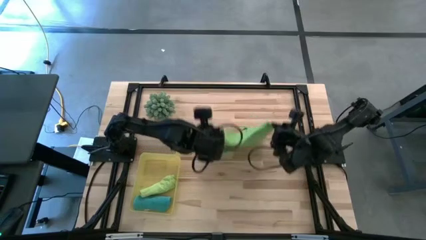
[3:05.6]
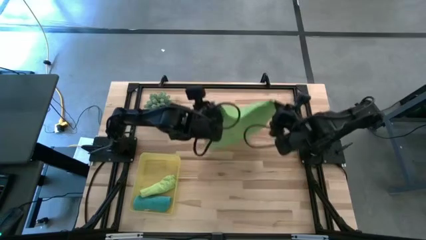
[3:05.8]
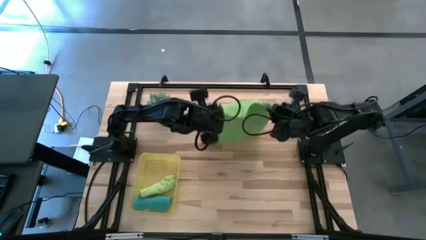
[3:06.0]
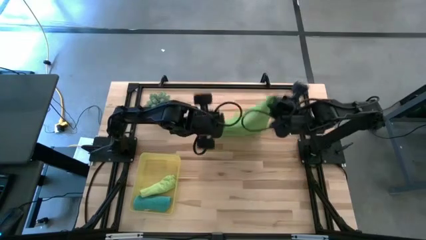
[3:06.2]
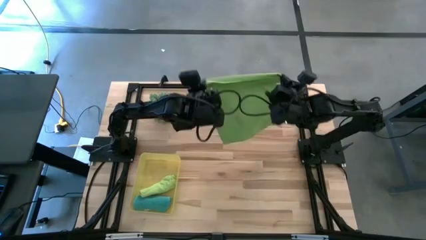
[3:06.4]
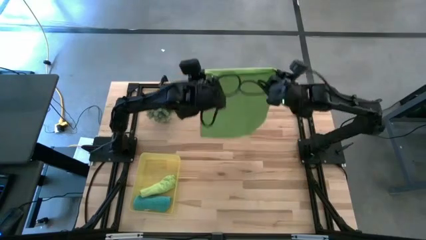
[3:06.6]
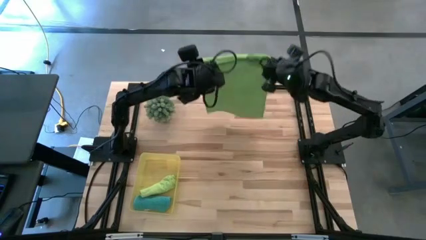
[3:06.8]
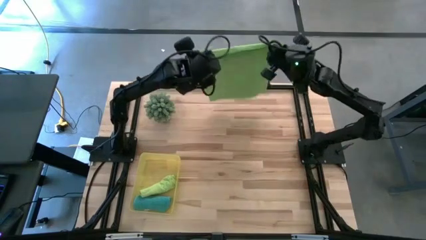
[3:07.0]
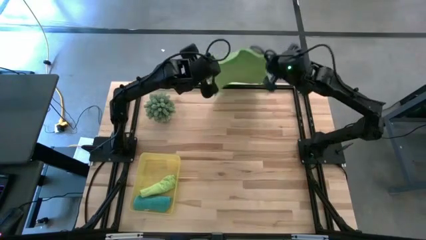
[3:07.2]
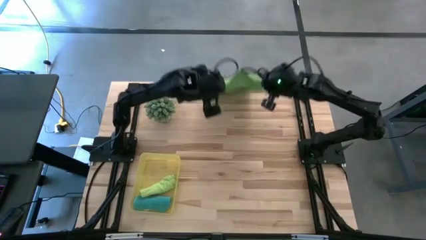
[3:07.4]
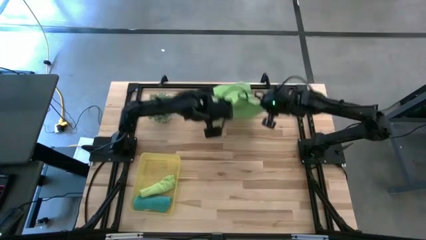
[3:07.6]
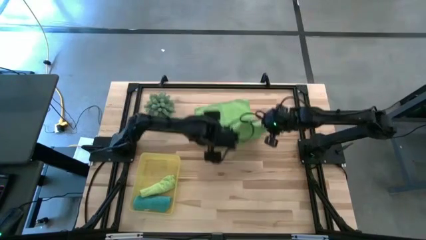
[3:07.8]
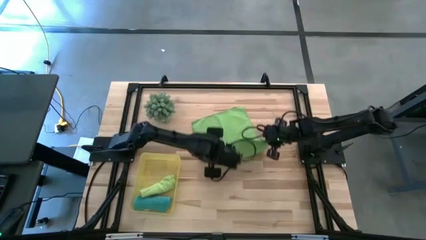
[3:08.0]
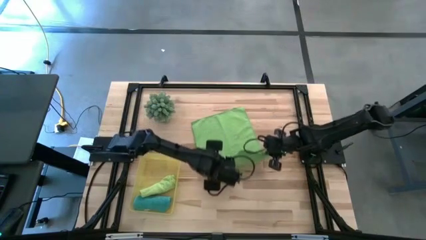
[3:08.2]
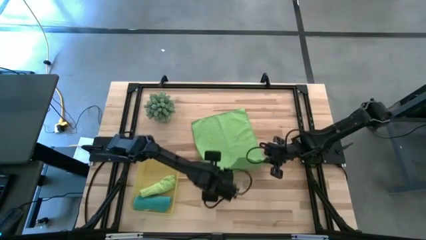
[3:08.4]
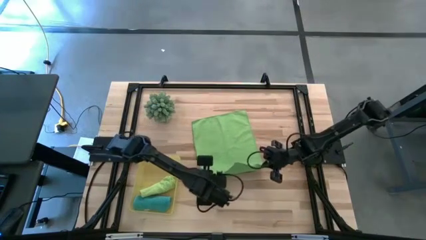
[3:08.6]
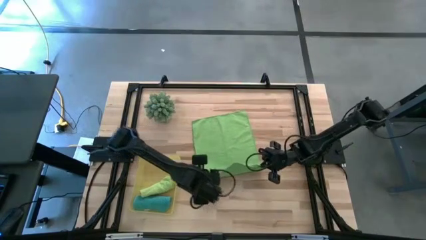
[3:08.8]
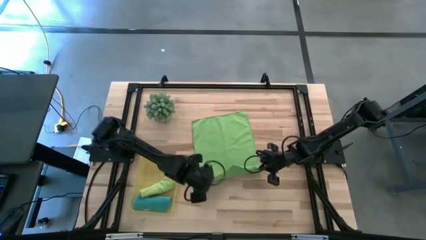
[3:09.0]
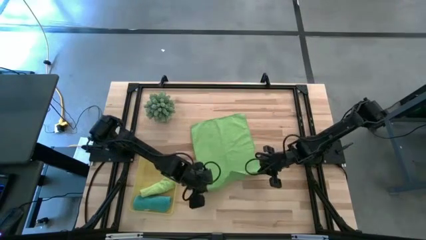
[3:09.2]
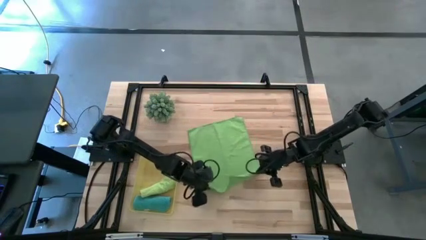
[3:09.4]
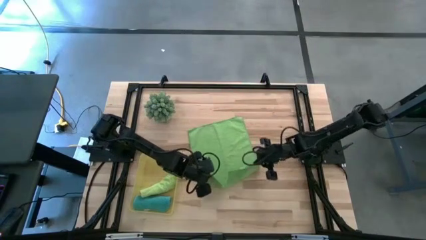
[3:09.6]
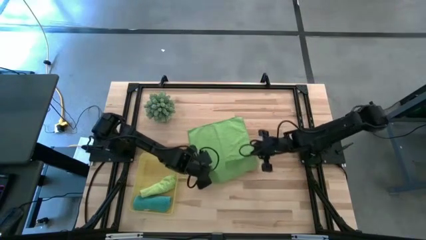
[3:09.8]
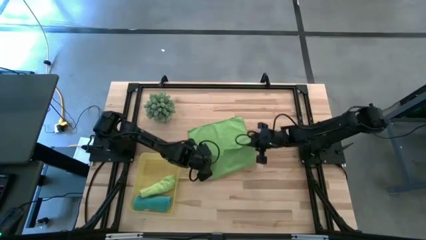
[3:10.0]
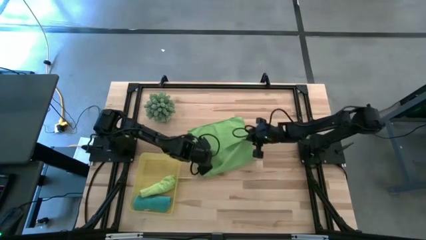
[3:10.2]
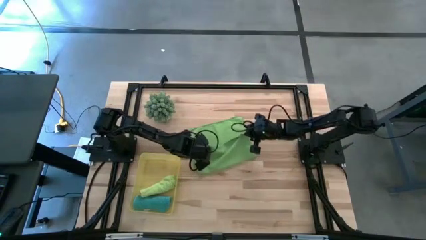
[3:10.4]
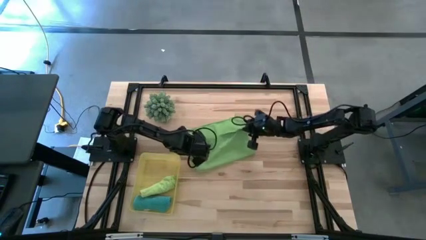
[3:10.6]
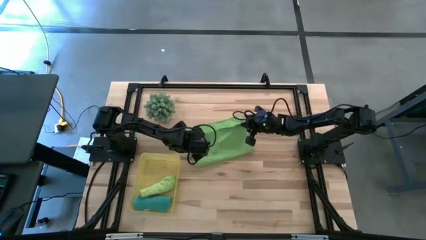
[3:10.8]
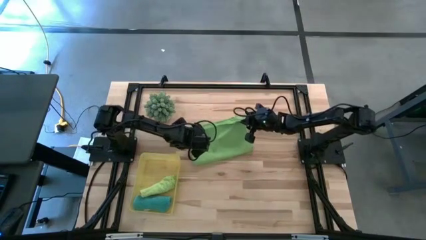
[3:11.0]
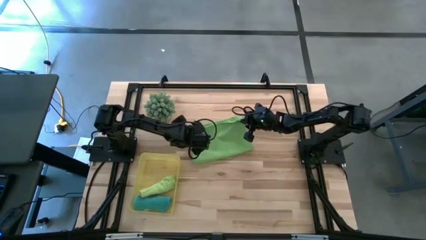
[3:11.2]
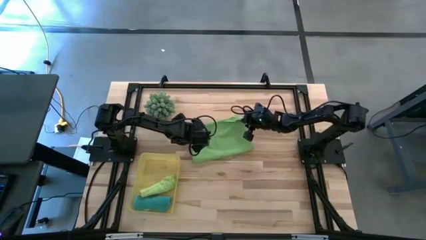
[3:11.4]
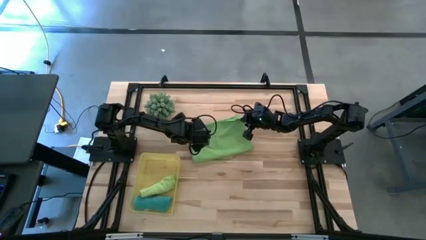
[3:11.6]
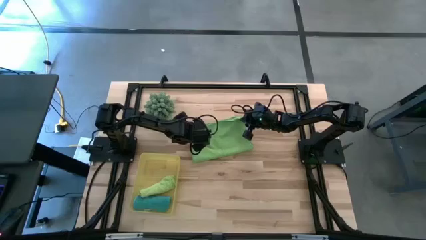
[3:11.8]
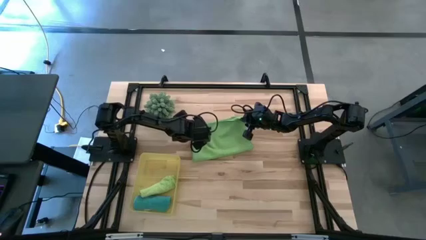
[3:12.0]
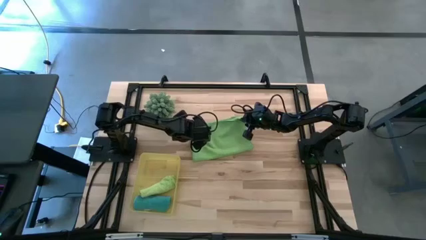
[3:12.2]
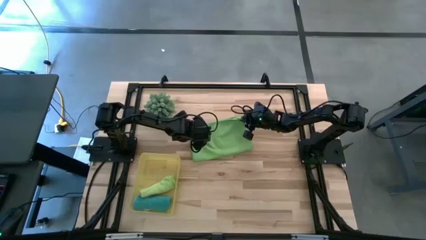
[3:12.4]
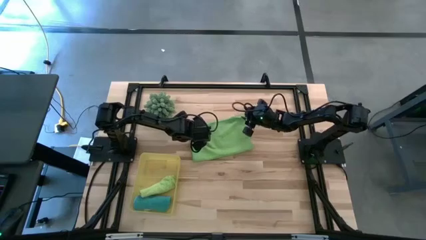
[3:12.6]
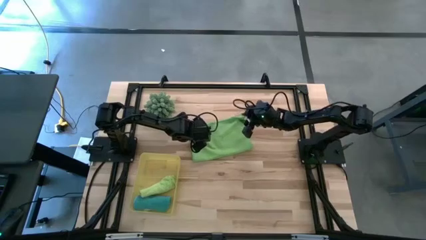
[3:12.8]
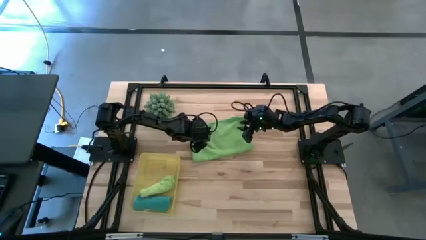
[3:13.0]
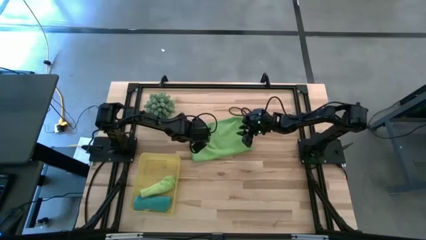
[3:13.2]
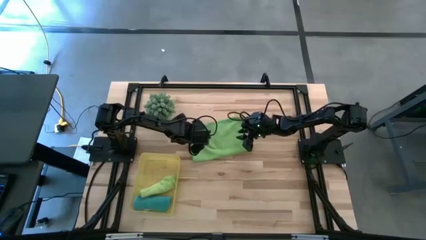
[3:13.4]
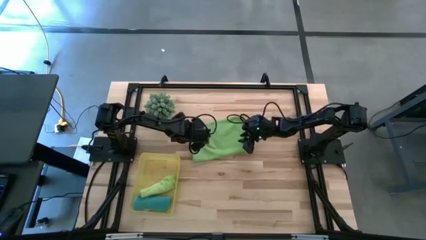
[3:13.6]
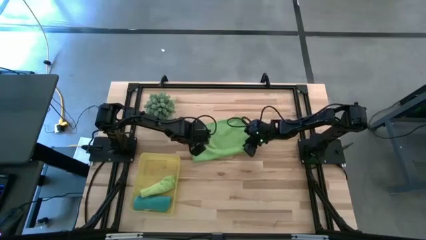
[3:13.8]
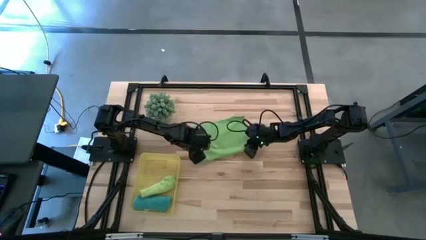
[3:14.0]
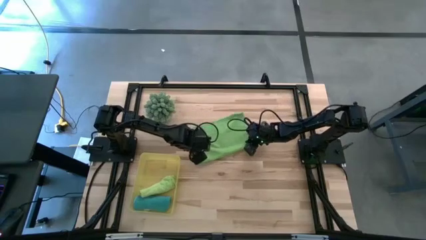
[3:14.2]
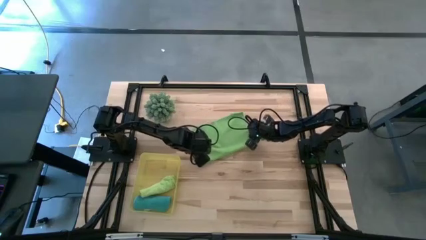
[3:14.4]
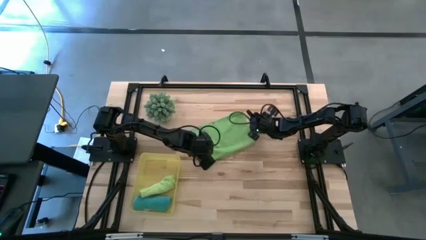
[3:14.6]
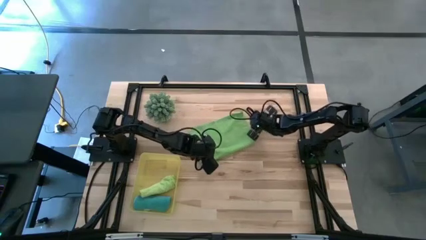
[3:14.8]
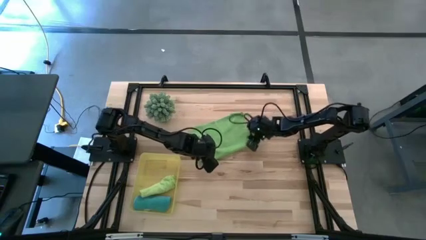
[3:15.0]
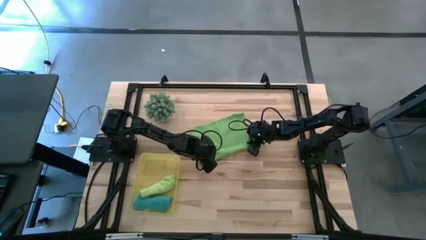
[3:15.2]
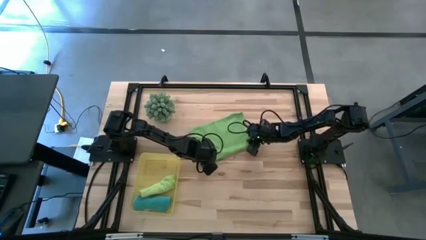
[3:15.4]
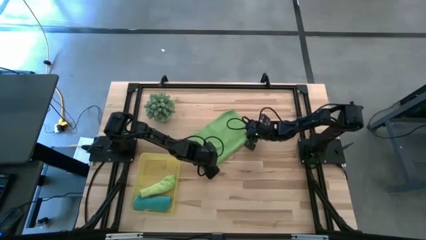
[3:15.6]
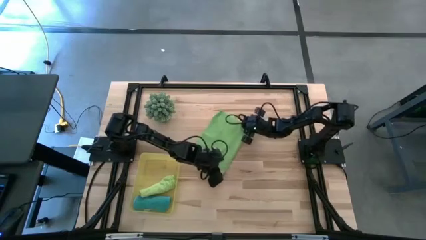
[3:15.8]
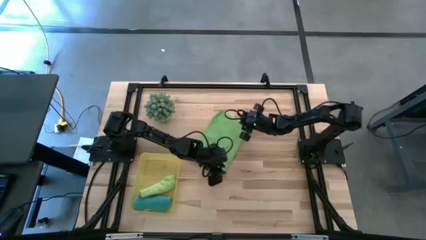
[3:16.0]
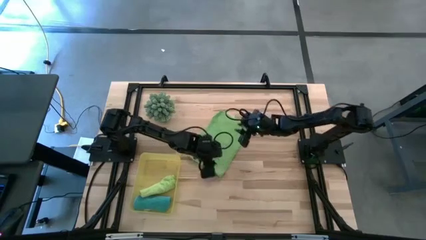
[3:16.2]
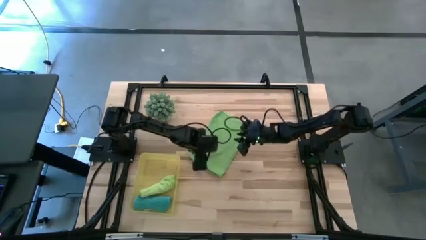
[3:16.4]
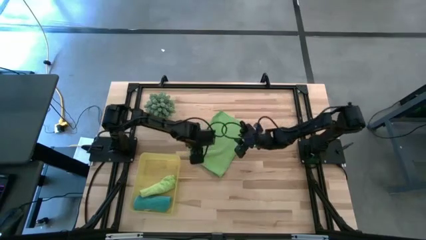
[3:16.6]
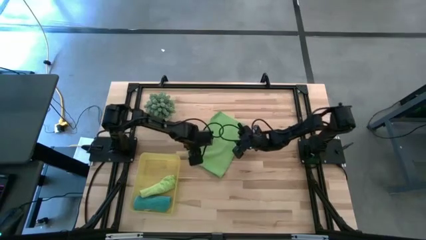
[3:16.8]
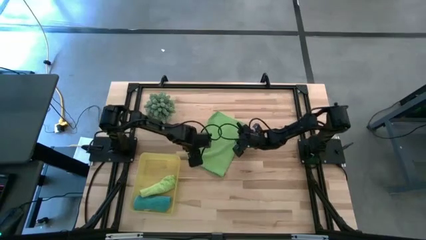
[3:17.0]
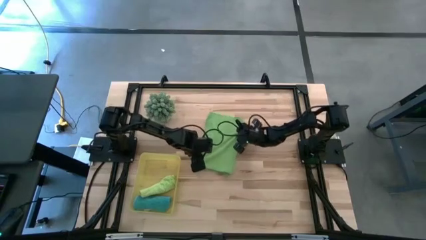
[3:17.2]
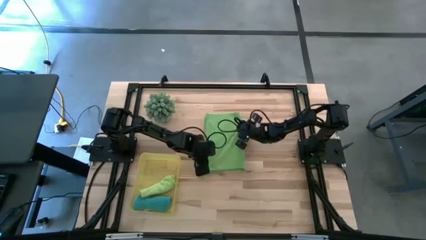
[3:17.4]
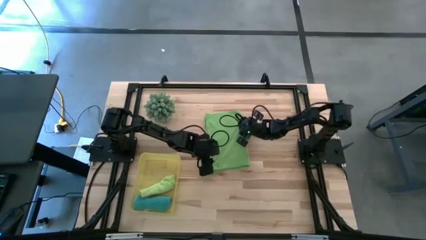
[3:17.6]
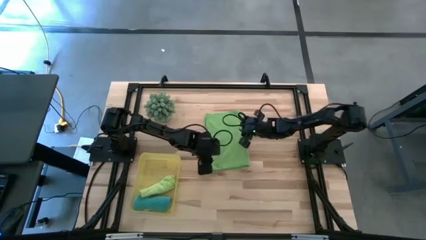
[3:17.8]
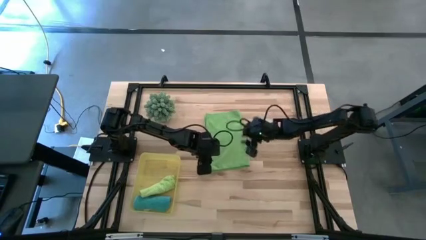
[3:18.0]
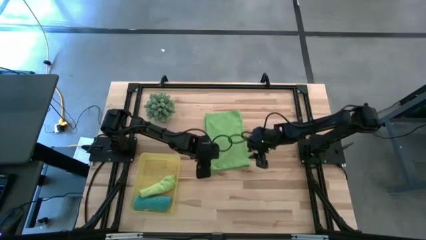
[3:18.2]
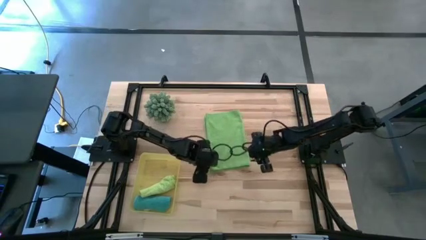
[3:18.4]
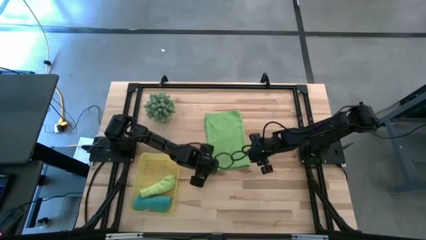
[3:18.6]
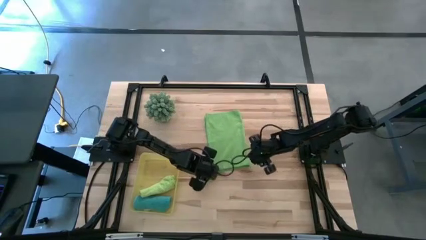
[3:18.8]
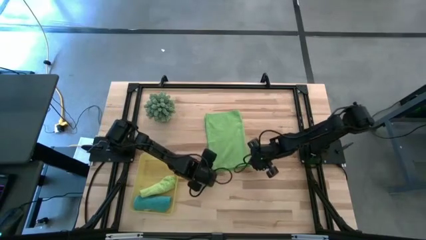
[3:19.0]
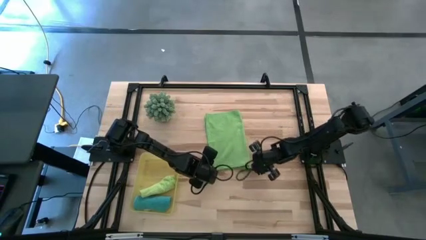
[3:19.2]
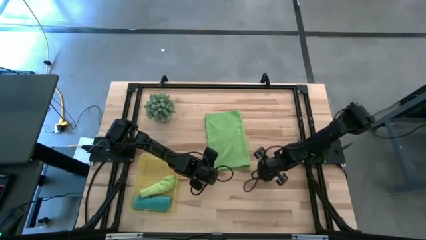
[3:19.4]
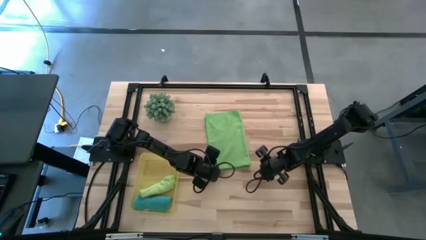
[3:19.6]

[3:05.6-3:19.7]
Task: Roll microfiber towels into tight, uniform cylinder then place into a basket
Fold the green towel

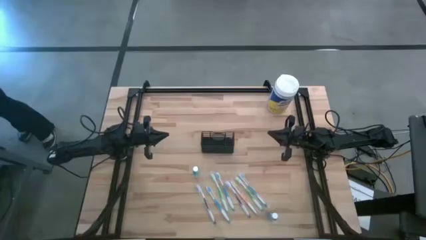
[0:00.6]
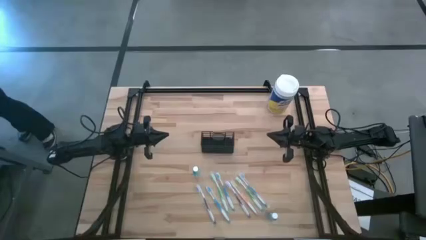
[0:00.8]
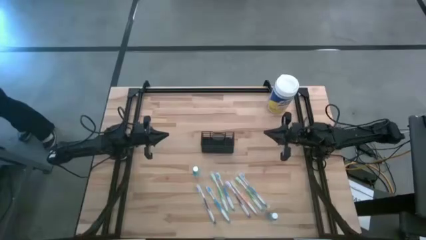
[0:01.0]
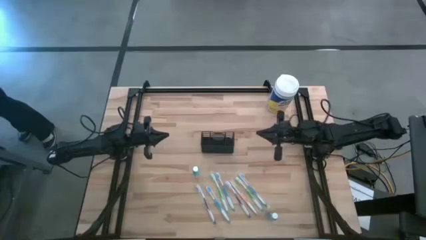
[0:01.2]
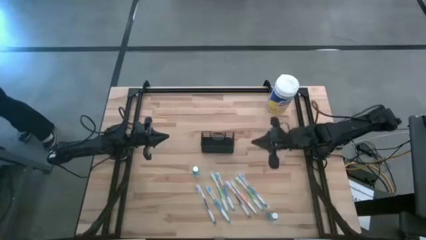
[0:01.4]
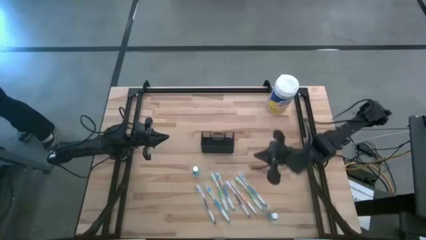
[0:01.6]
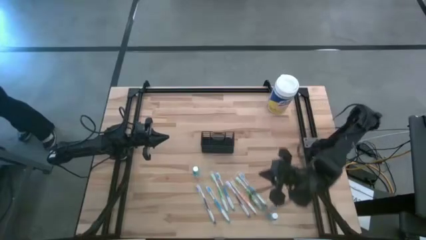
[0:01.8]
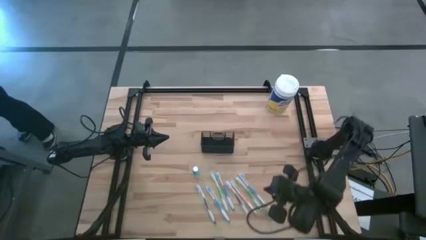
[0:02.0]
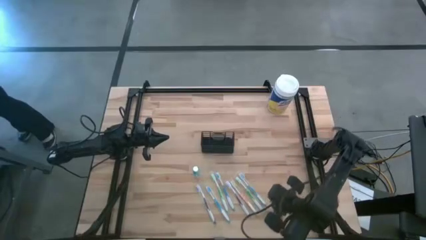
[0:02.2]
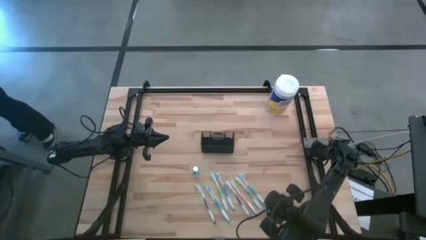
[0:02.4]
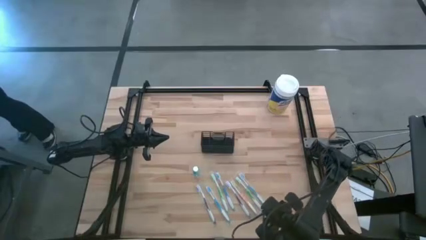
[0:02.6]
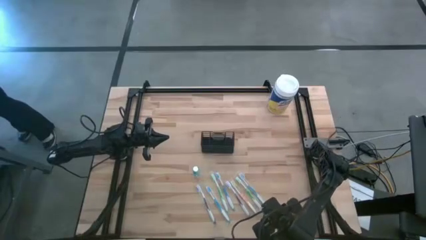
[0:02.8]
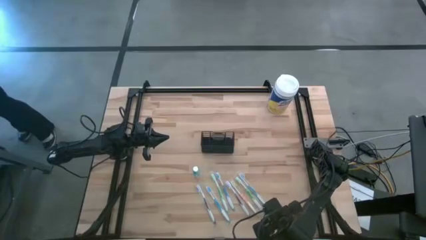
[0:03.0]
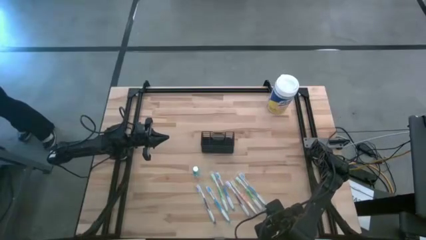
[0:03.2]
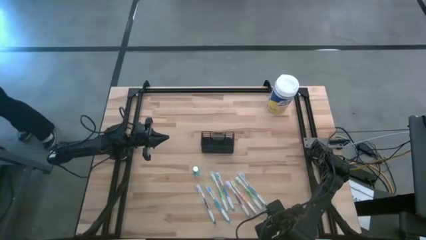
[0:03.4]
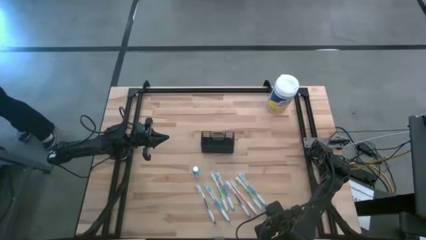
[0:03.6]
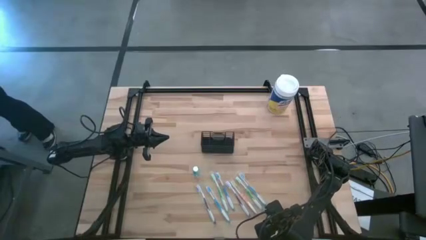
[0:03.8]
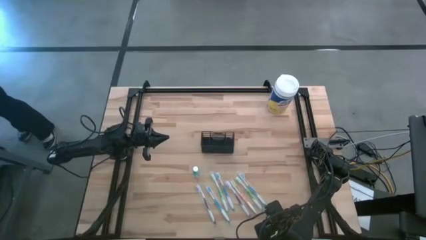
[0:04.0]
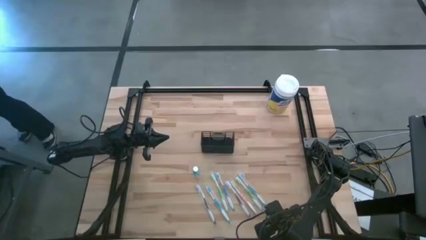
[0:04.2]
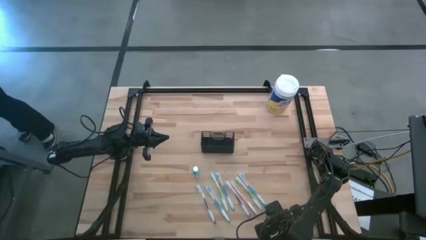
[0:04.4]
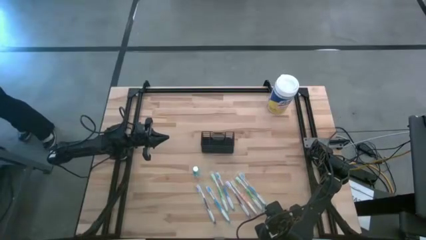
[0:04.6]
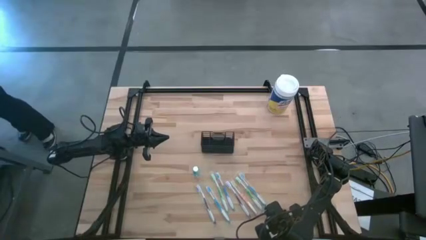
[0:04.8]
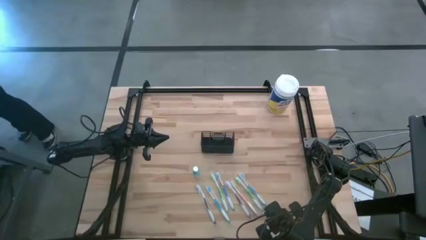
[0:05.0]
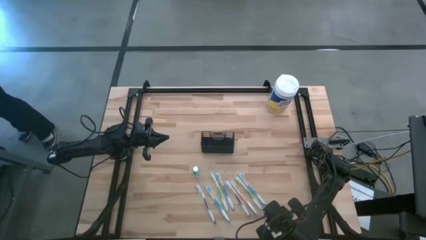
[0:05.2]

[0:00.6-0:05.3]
Task: Pick & Place toothbrushing station
Put the bottom blue mouthwash bottle into the black wire organizer
